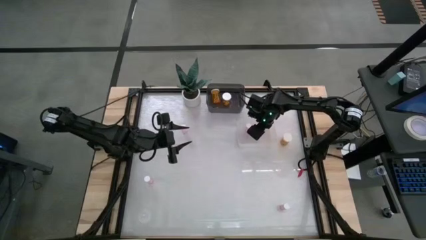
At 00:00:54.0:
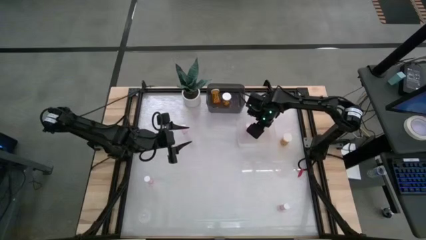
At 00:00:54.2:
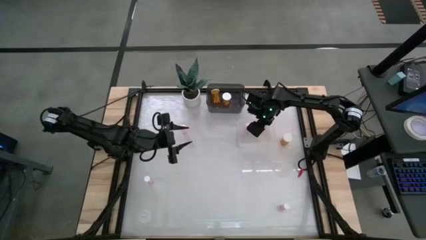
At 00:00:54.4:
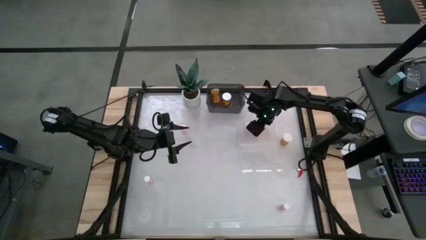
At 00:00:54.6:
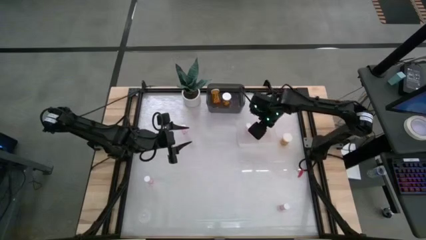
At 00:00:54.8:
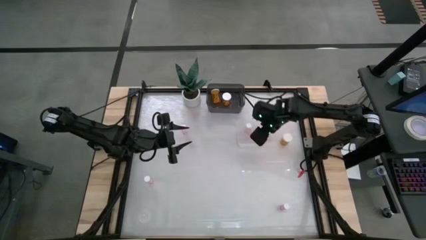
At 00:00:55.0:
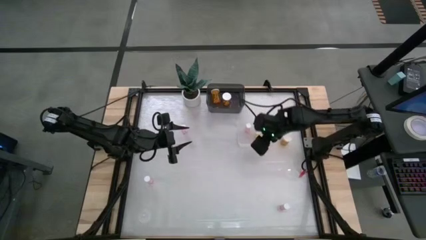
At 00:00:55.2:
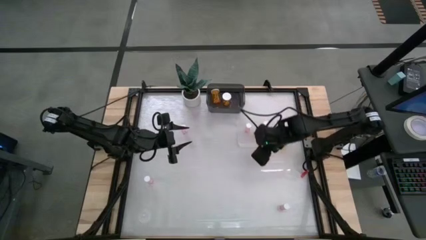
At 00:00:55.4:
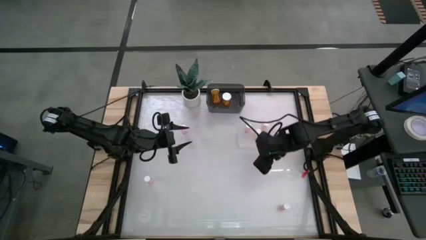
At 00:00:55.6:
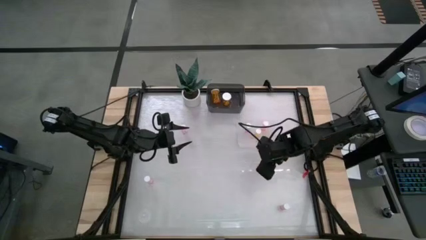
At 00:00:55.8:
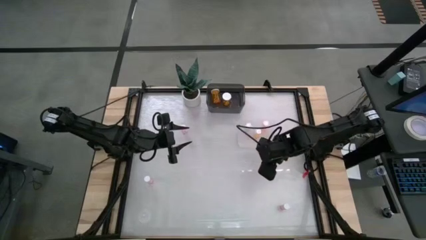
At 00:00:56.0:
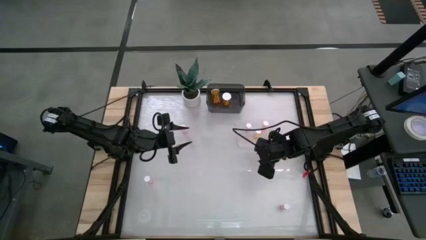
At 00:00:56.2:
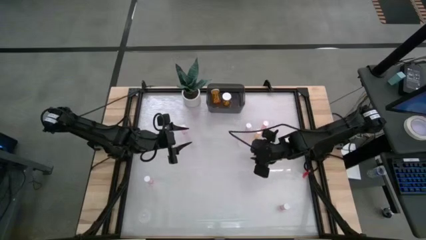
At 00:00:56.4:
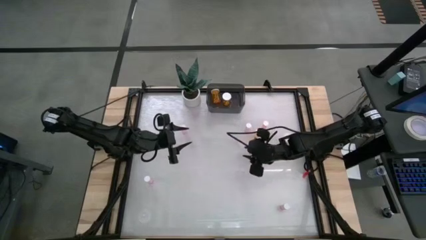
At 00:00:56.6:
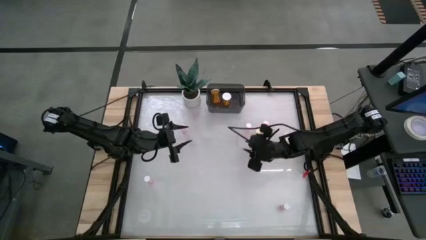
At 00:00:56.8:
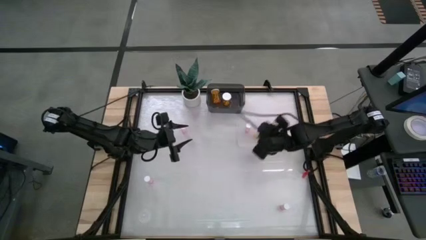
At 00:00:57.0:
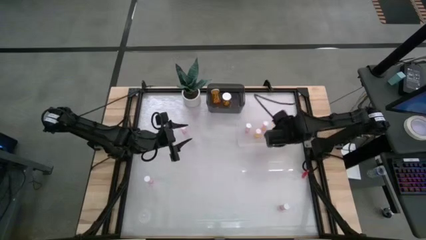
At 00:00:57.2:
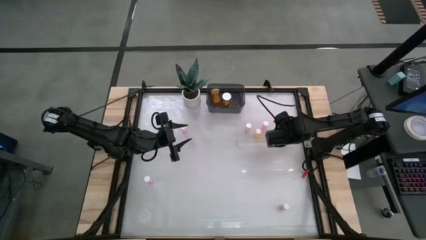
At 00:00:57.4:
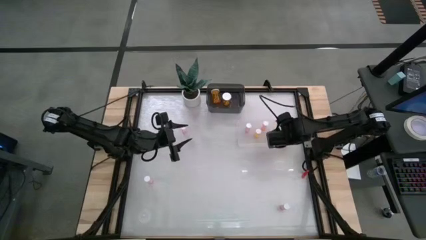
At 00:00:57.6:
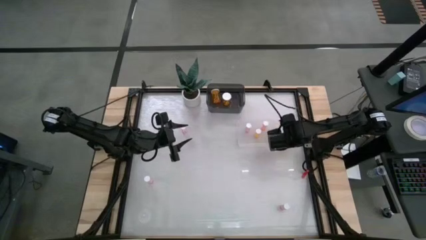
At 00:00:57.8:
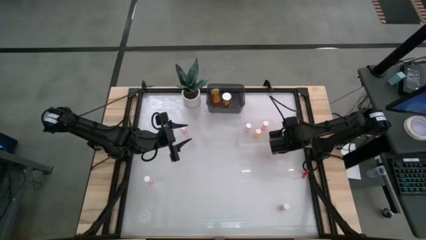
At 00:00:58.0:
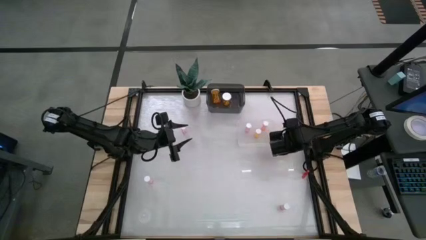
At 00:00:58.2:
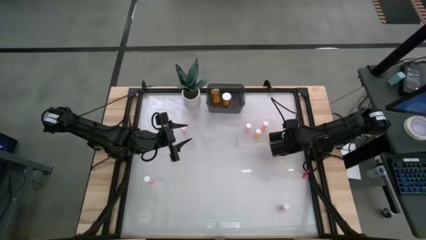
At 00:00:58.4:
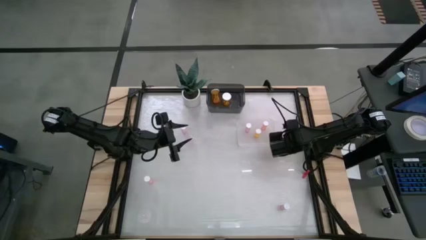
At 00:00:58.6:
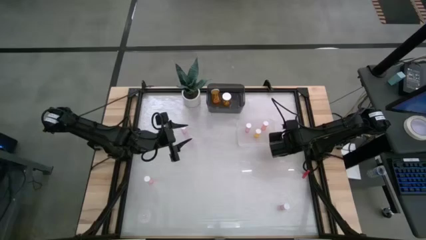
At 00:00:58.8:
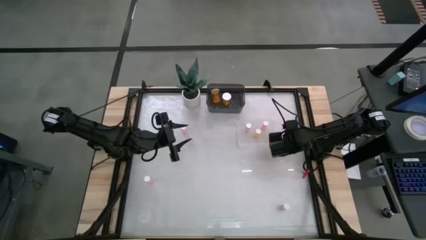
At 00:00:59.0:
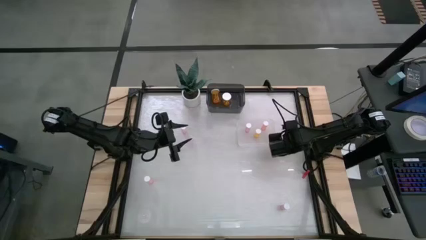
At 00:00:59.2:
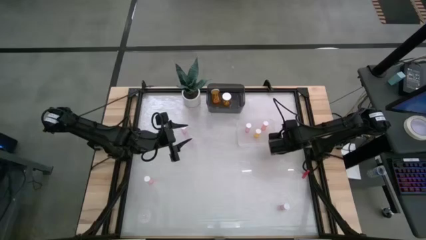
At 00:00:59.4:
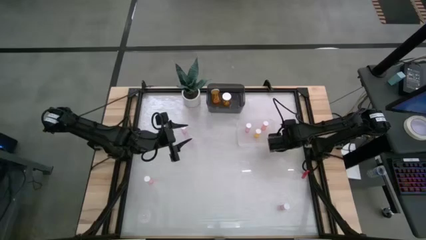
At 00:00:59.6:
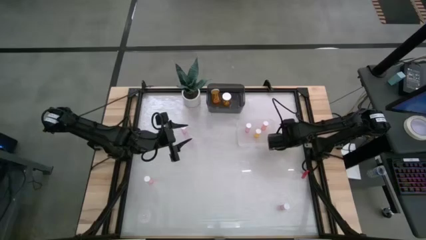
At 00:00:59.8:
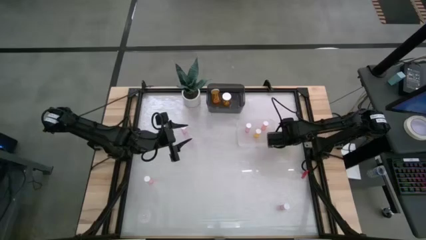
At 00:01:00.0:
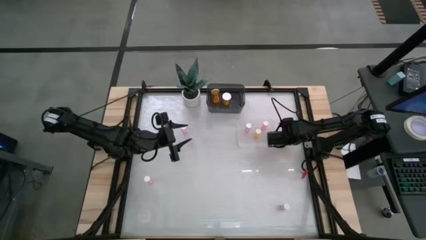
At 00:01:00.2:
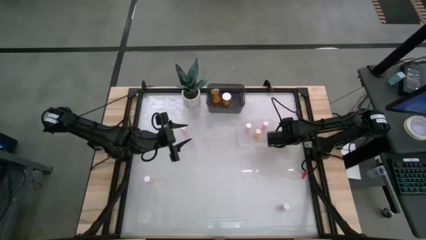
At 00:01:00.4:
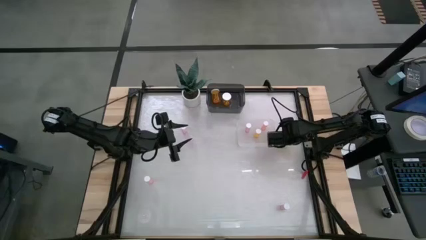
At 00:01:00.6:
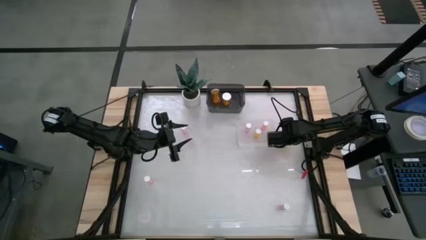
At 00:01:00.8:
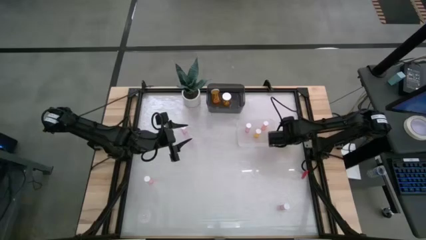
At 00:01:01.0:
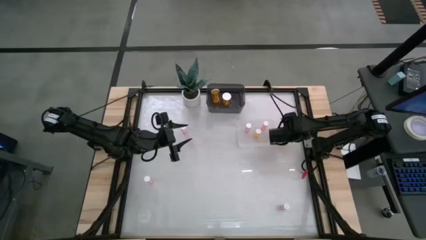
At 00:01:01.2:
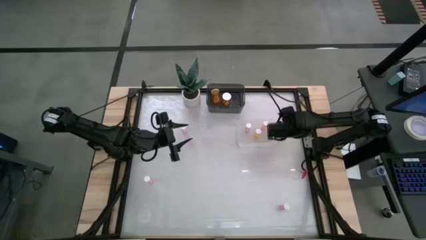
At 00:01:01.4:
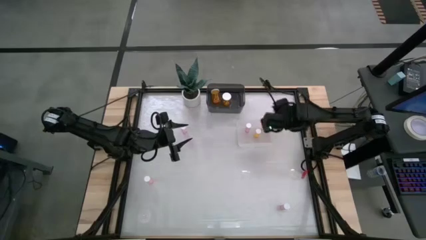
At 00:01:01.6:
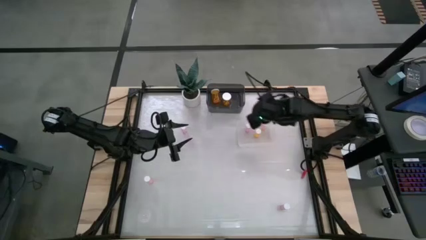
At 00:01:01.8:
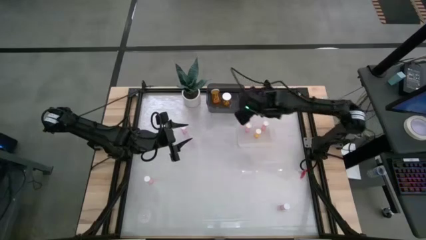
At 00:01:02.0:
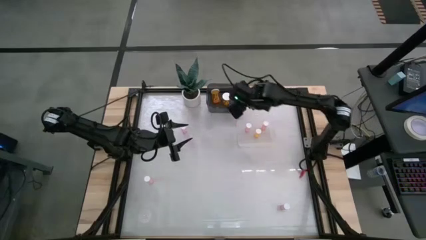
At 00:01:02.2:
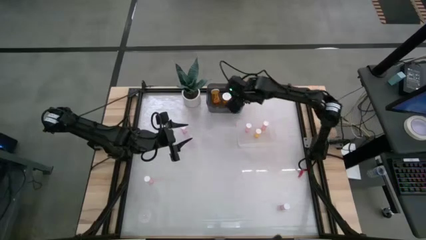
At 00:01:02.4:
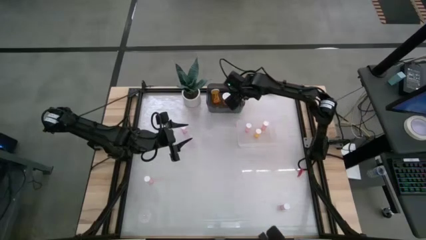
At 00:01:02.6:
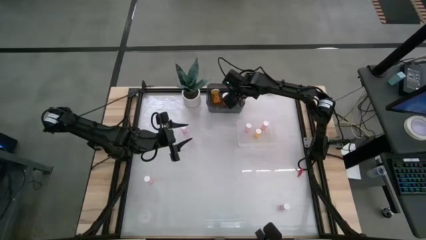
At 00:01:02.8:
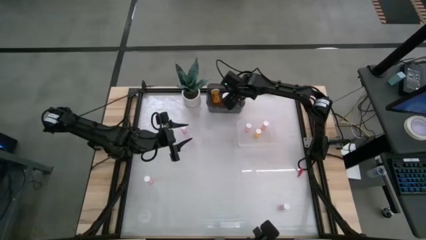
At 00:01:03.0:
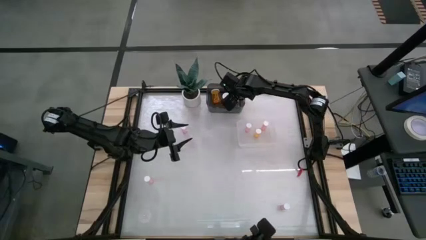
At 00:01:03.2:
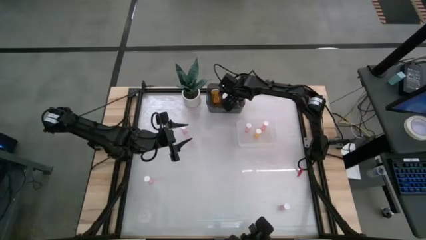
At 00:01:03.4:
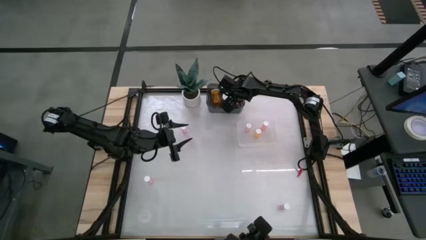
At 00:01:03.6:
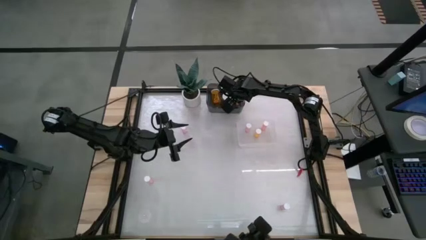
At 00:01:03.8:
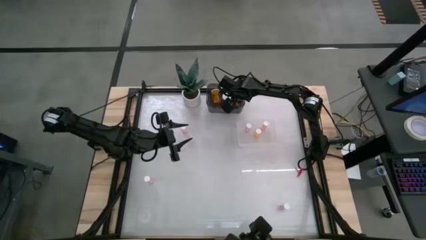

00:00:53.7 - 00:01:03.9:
Task: Pick and place medicine bottles into bin by pill shape (circle, oval)
Put the large orange pill bottle into the black bin

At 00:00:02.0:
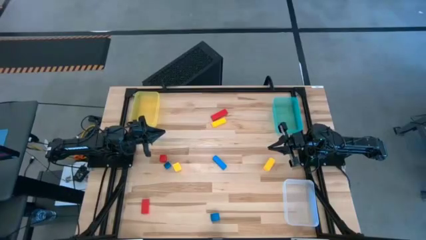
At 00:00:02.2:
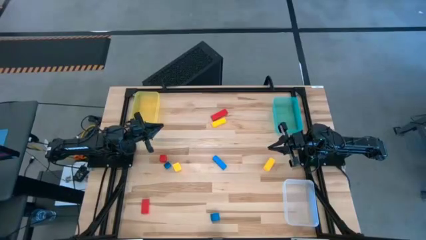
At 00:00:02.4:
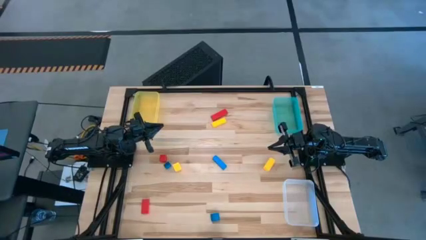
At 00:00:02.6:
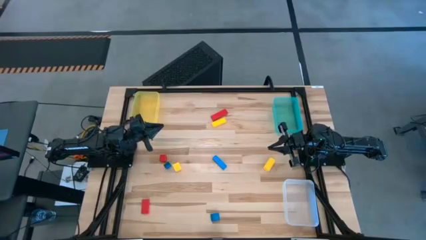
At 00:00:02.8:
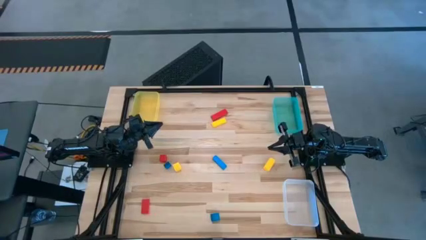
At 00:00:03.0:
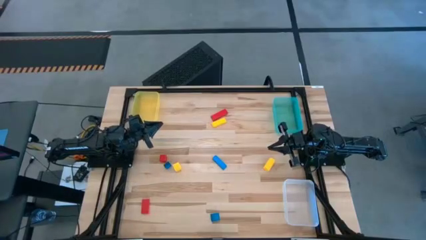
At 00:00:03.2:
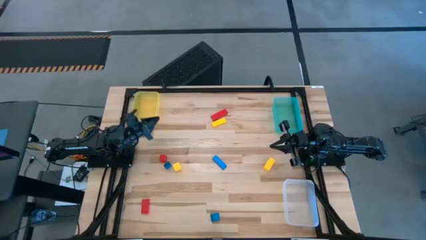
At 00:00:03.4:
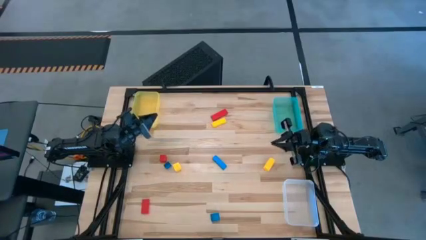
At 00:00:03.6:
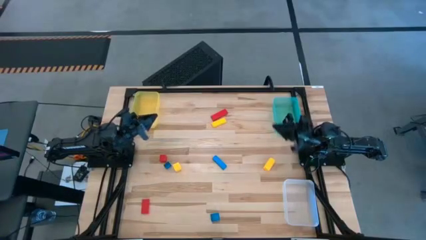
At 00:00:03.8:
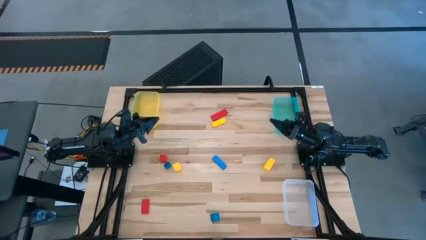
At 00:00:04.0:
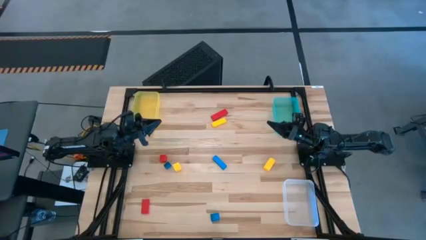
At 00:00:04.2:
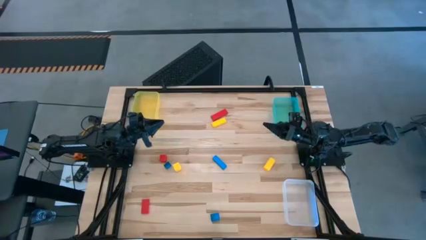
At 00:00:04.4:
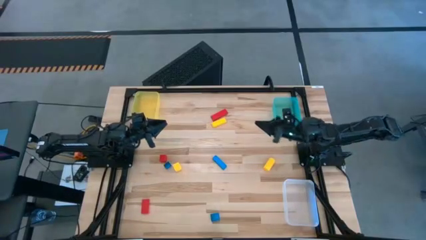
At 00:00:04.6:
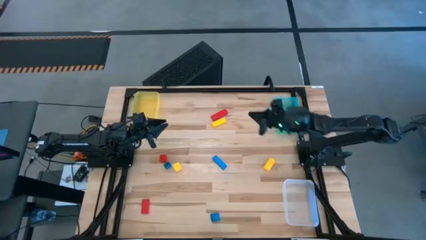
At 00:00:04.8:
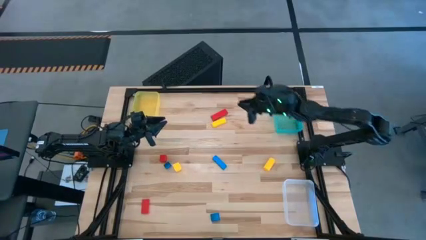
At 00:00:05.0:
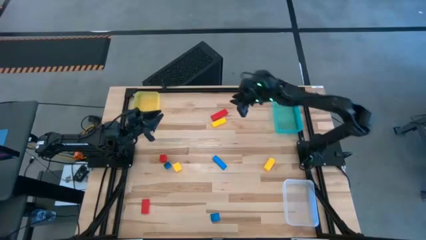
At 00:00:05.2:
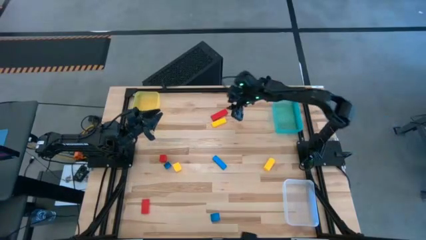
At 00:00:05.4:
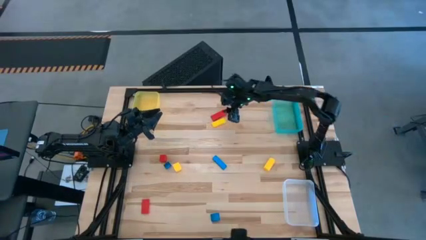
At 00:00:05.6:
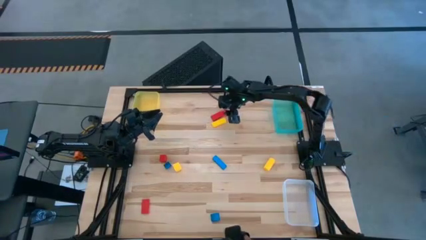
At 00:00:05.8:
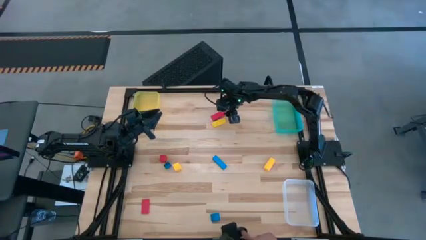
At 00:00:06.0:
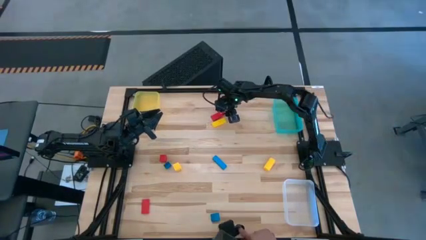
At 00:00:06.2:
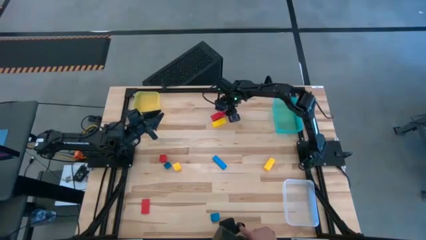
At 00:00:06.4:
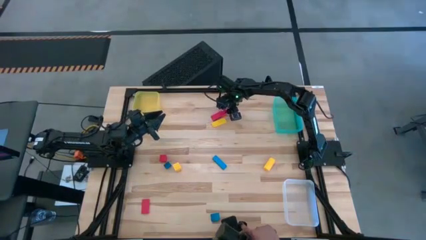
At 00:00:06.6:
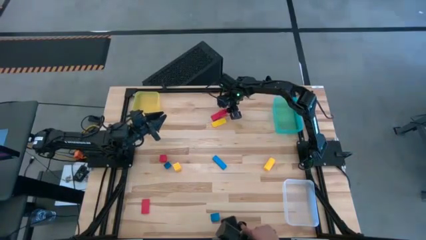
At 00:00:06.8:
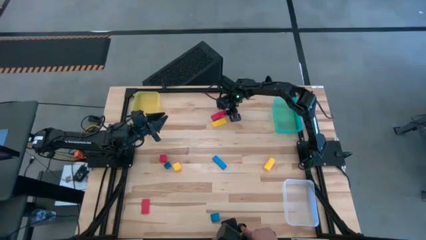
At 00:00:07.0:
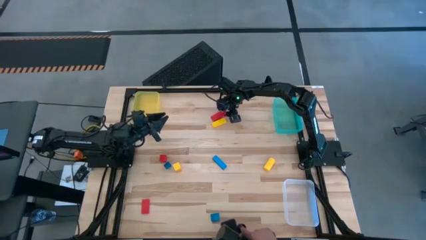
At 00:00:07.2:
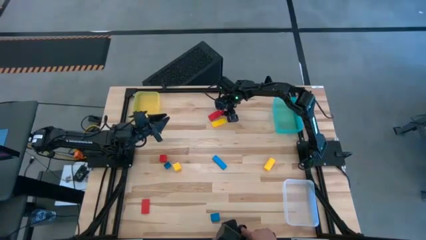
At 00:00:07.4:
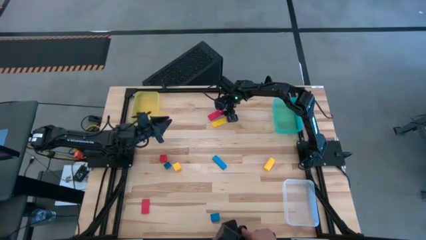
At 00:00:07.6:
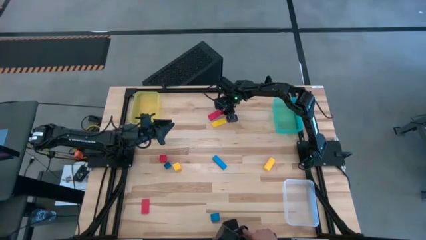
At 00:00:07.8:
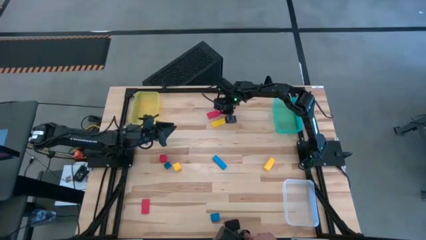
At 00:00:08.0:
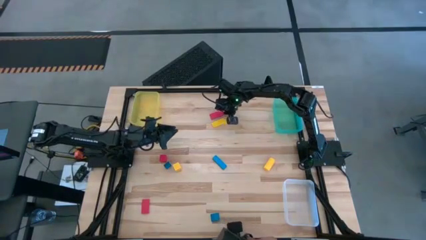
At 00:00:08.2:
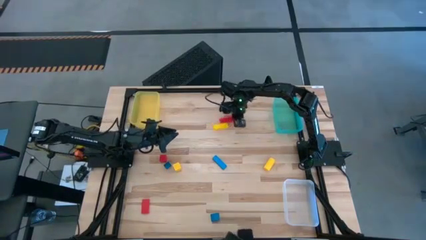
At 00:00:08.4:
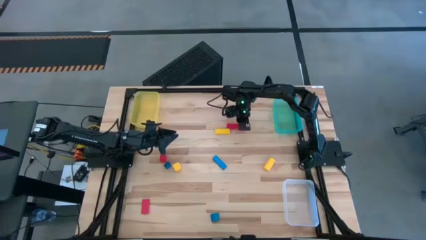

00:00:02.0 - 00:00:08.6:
Task: Sort & place blocks by color
Put the top red block into the yellow bin
